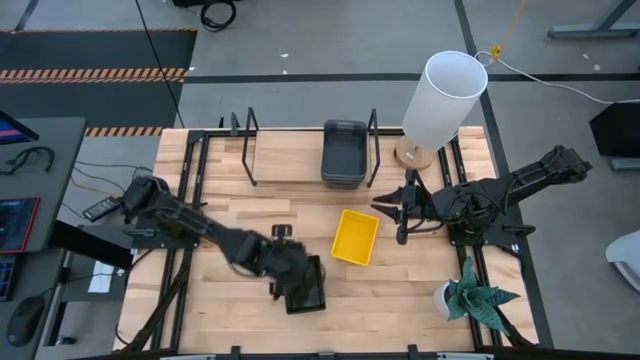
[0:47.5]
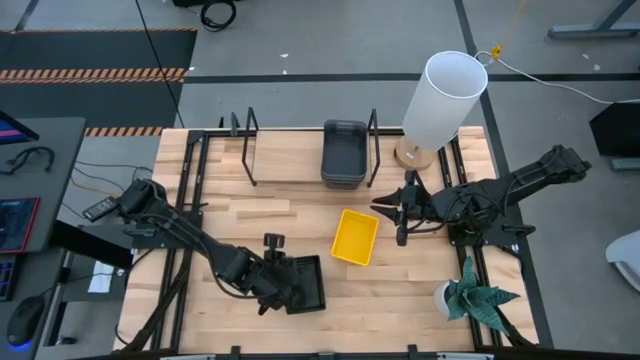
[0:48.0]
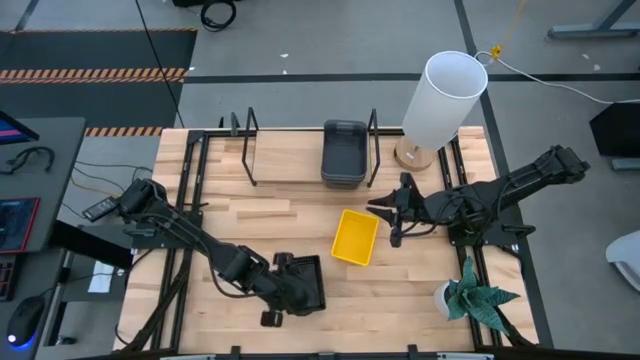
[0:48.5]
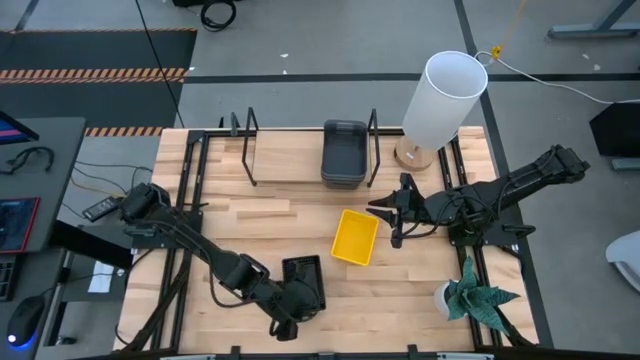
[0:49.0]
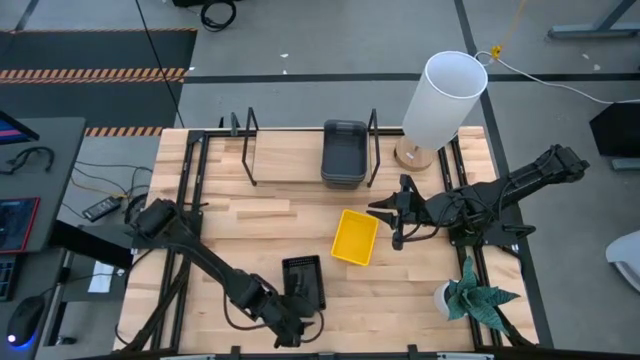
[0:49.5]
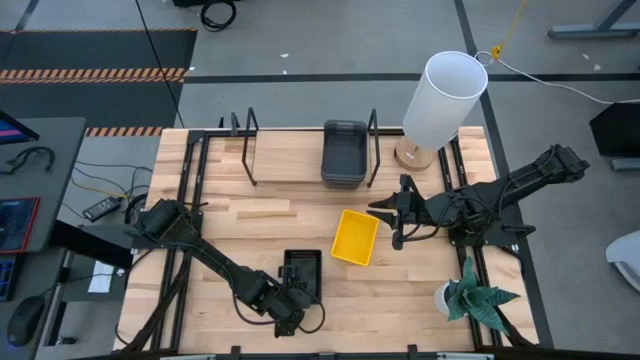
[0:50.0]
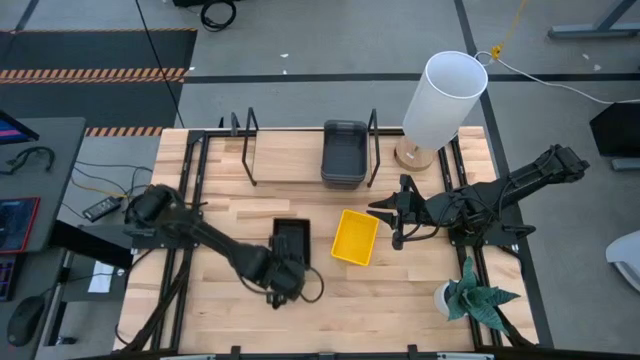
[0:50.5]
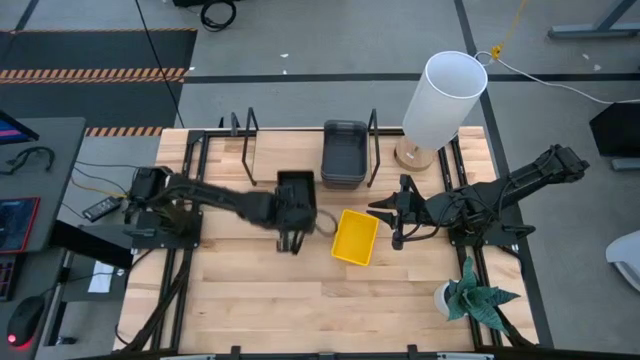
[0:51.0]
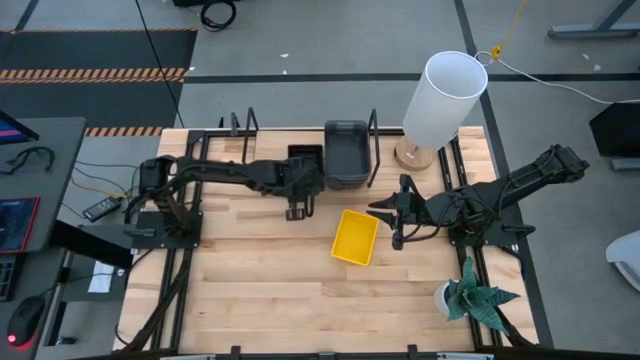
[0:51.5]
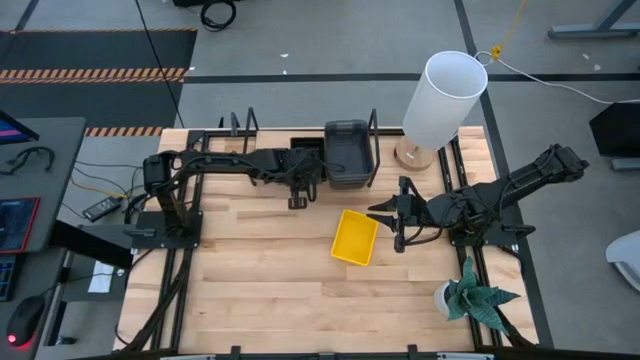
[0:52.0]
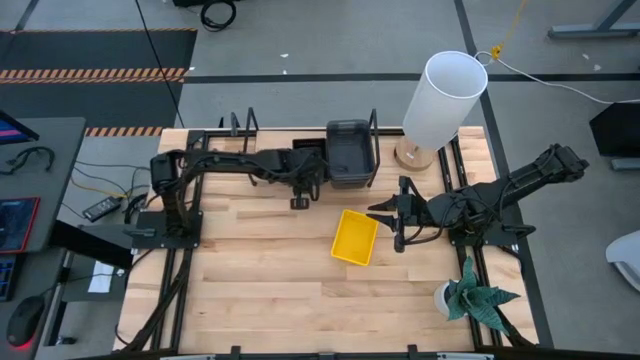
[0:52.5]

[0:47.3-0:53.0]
Task: Stack baskets on shelf by color
Put the stacked black baskets on the shelf

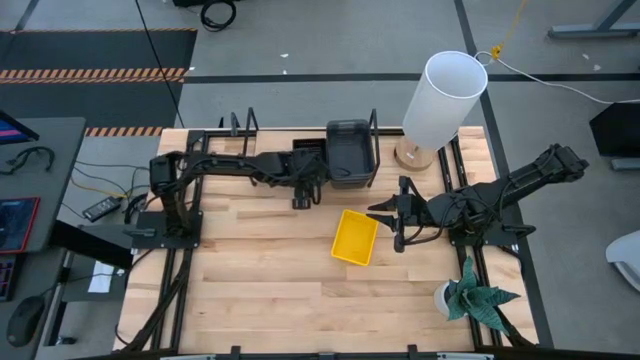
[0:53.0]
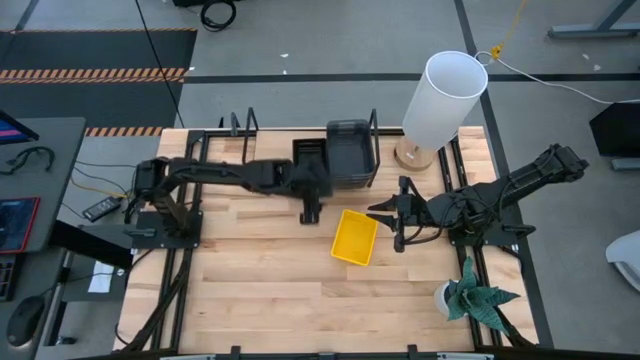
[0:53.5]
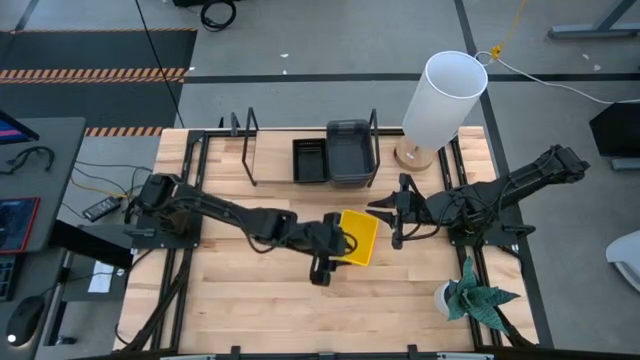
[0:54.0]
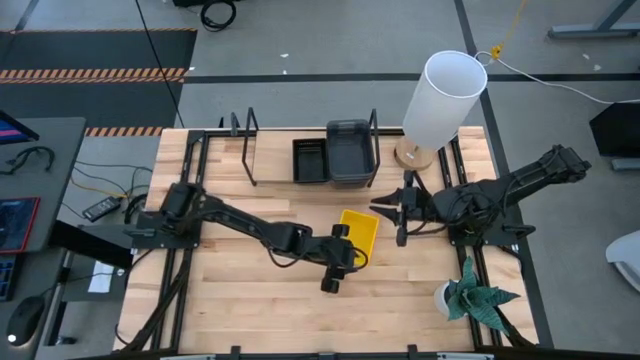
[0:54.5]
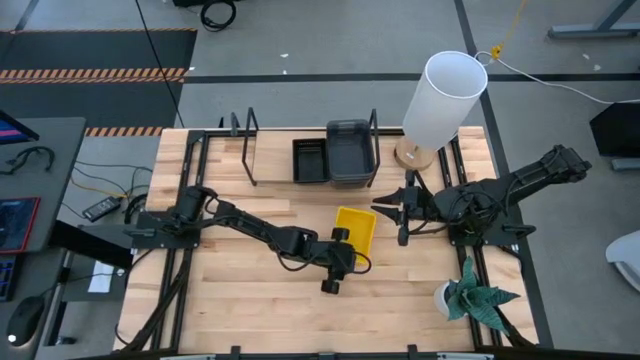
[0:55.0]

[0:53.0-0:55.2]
Put the stacked yellow baskets on the shelf

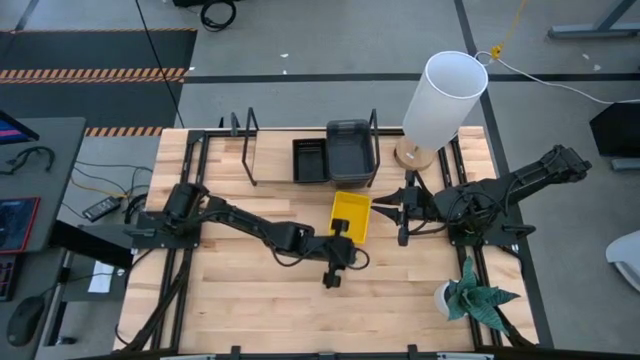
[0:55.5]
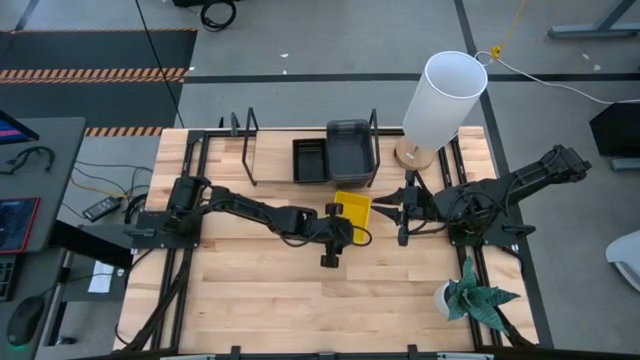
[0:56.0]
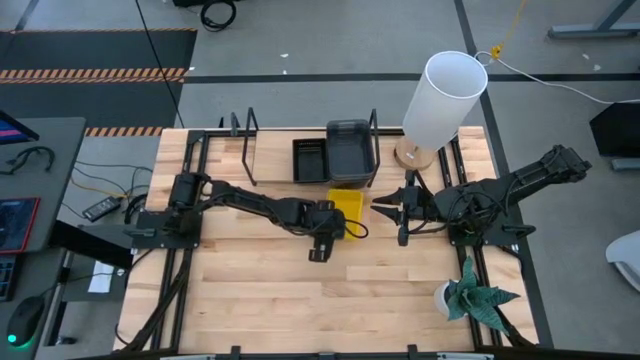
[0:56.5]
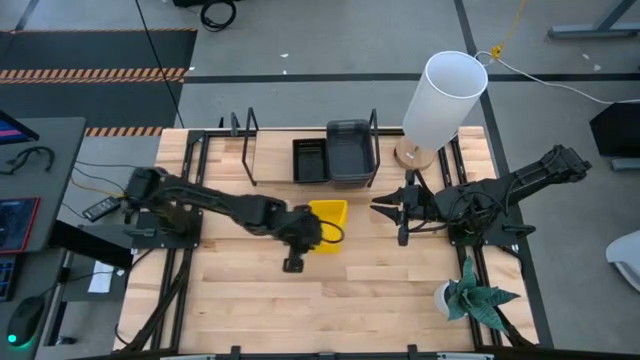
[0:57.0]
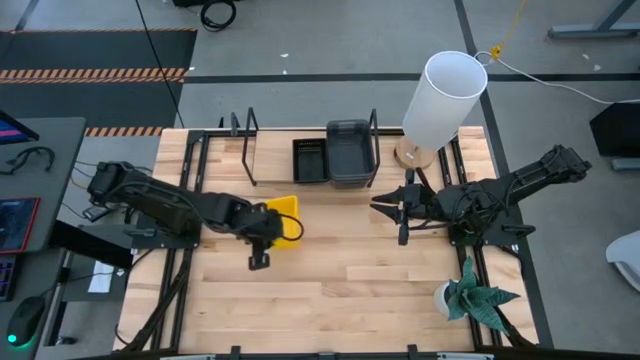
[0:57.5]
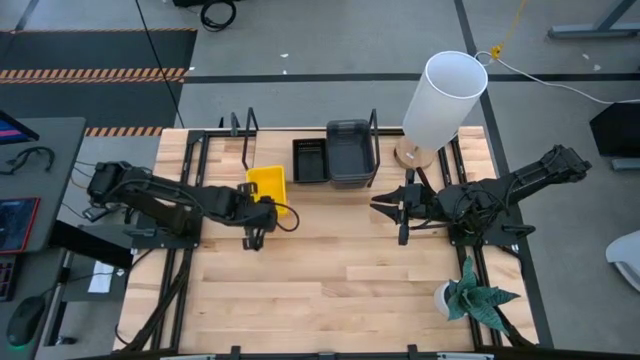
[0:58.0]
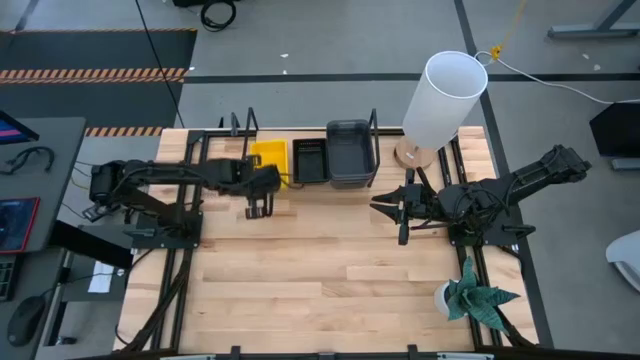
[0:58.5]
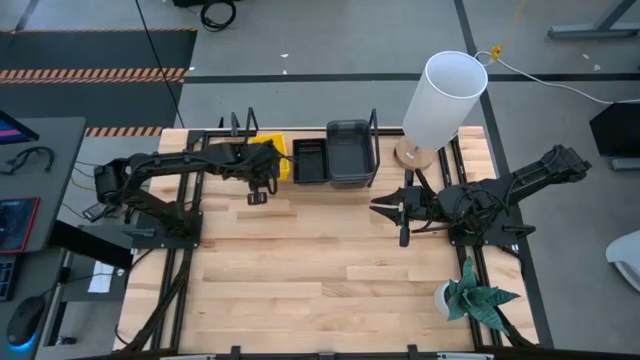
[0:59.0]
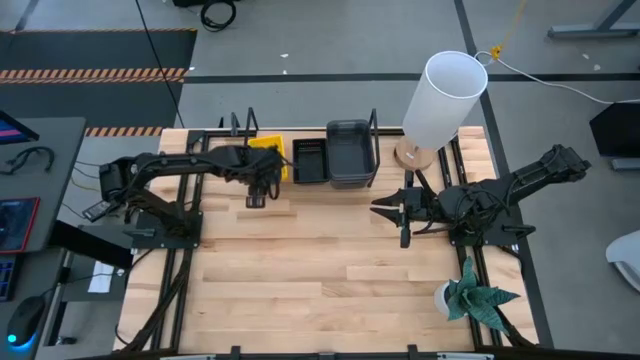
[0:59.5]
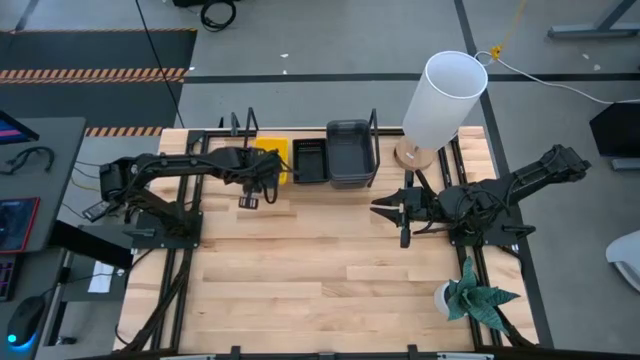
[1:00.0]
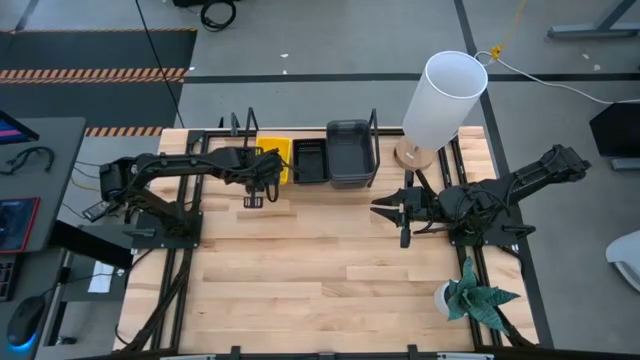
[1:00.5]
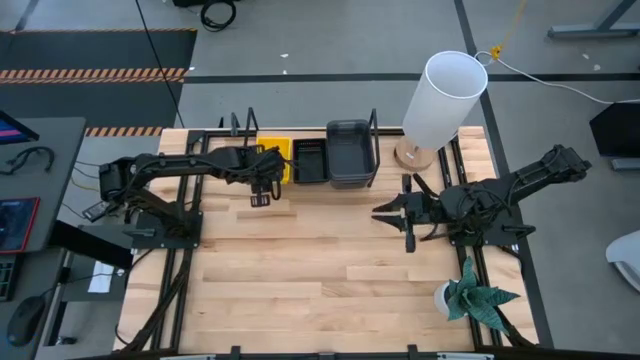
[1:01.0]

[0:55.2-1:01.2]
Put the stacked yellow baskets on the shelf

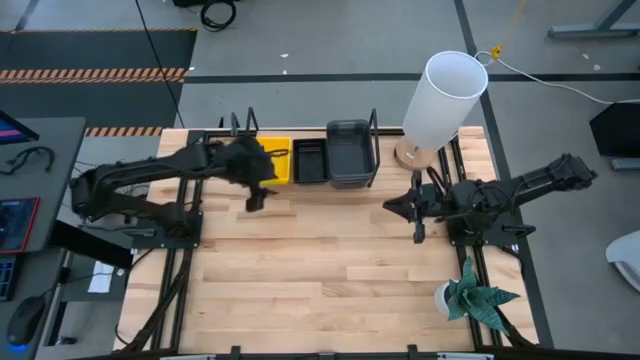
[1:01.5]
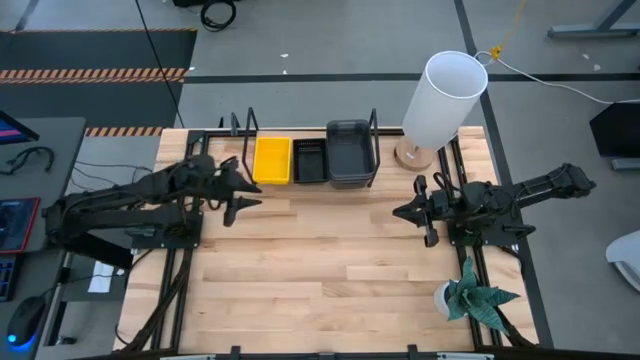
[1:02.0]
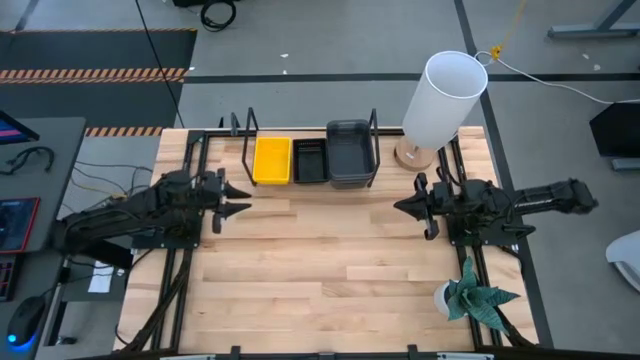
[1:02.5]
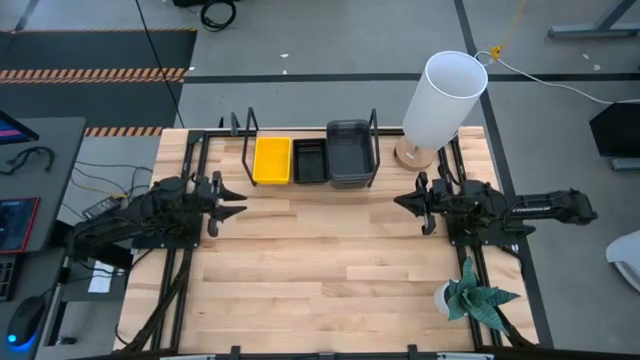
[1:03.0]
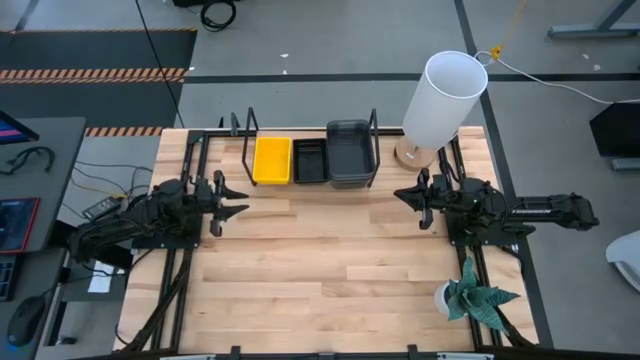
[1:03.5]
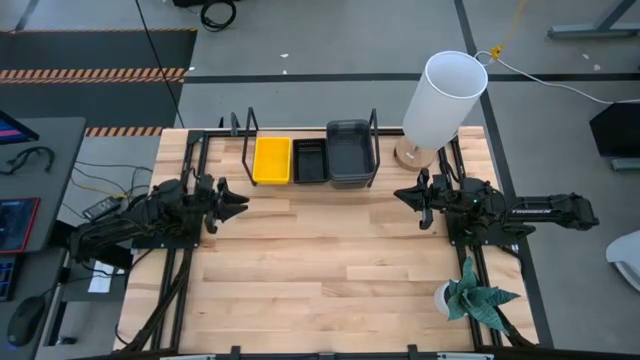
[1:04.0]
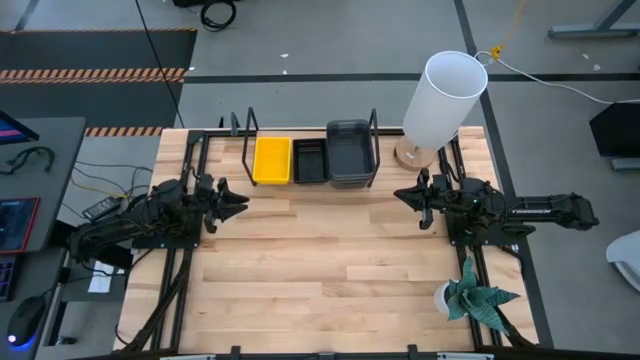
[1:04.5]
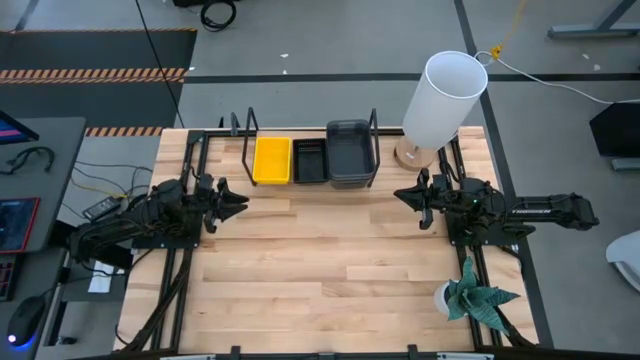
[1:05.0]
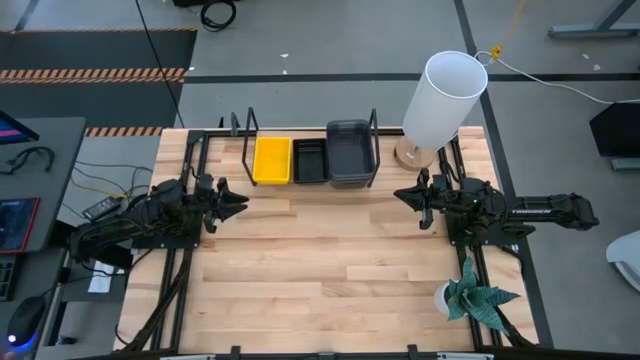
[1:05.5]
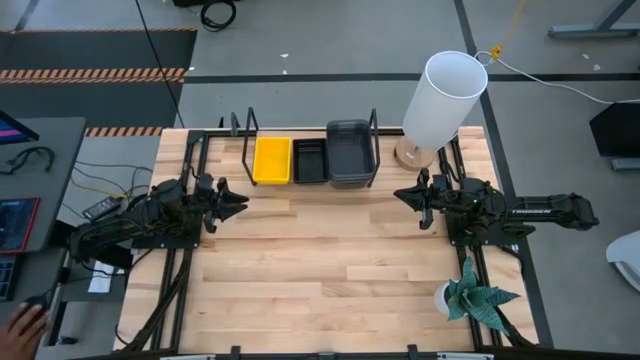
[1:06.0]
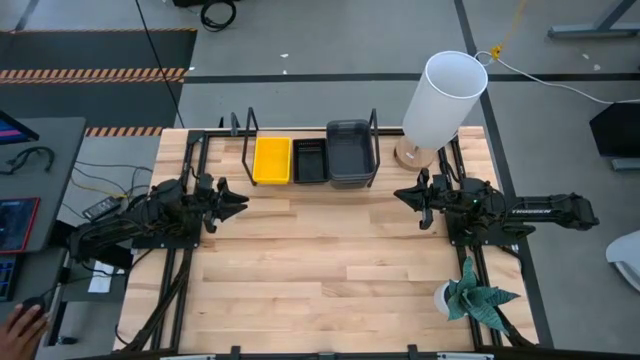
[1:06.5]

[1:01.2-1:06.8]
Return to Home Position

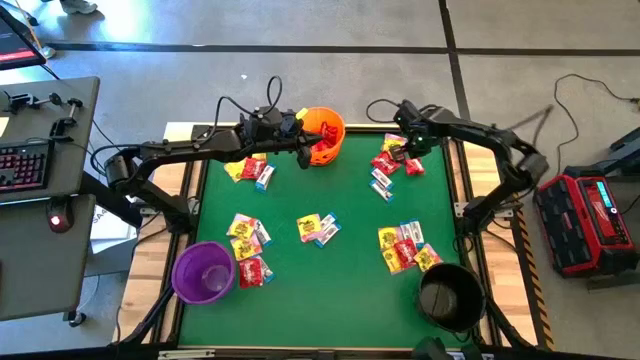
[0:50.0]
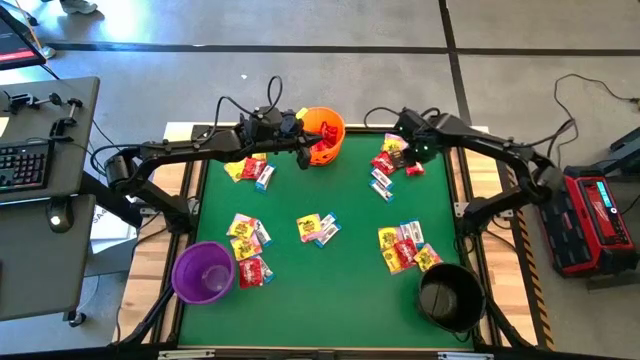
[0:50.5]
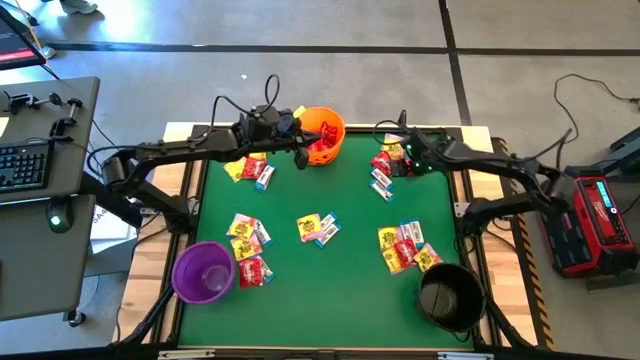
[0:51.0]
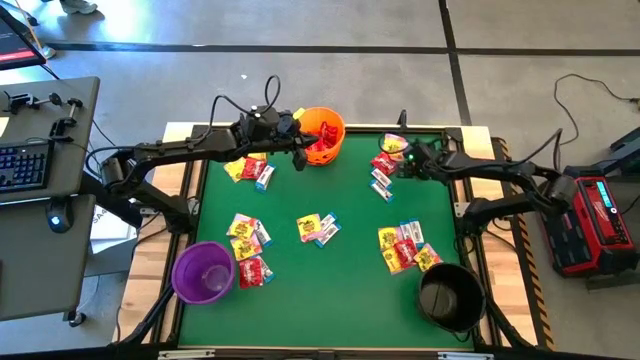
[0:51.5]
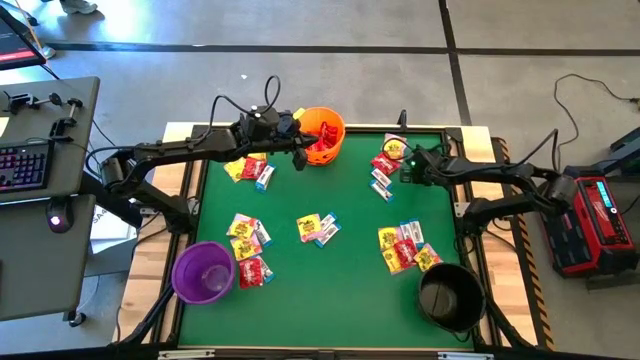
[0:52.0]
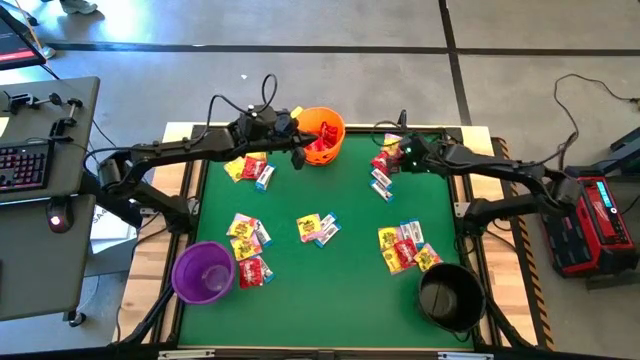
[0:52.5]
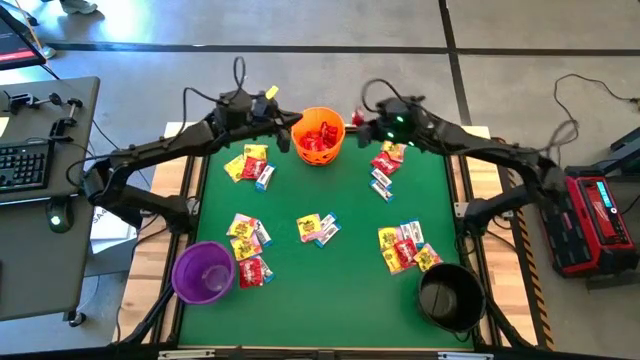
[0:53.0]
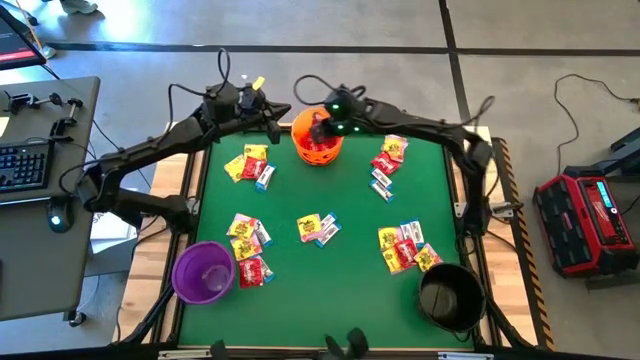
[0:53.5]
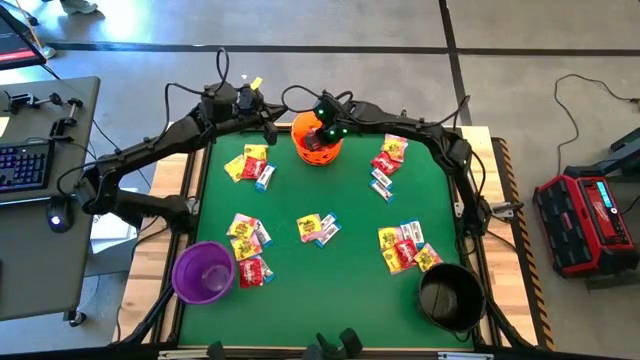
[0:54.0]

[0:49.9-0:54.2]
Task: Sort candy by brand, put in halloween buckets
Put the red candy into the orange bucket
